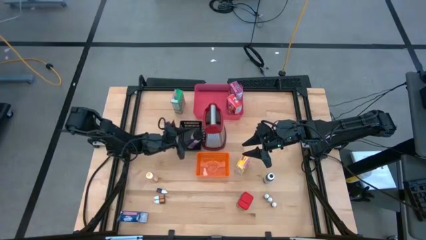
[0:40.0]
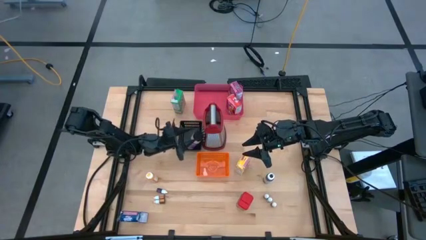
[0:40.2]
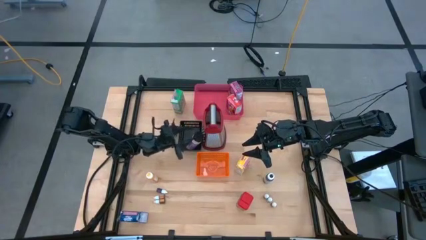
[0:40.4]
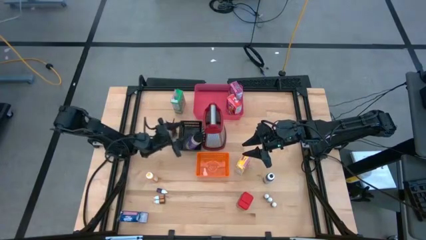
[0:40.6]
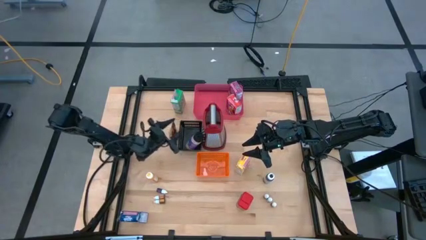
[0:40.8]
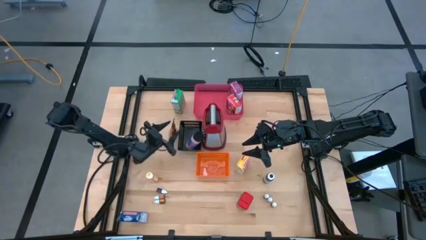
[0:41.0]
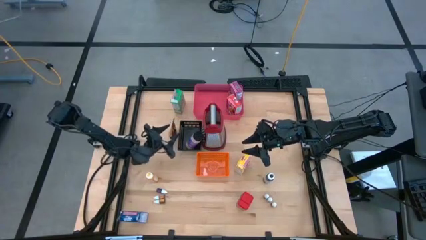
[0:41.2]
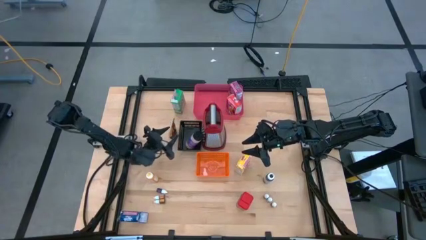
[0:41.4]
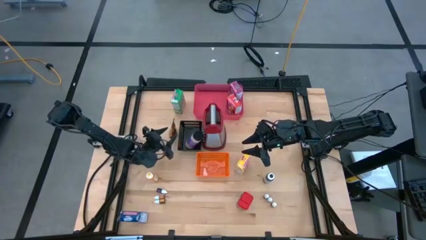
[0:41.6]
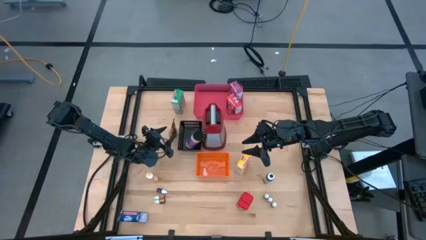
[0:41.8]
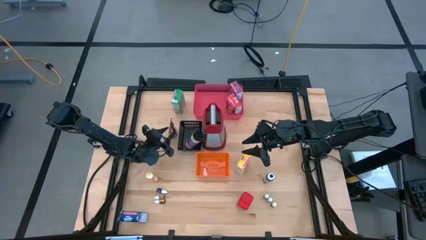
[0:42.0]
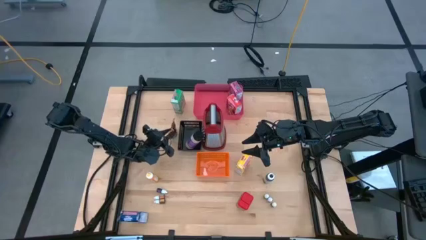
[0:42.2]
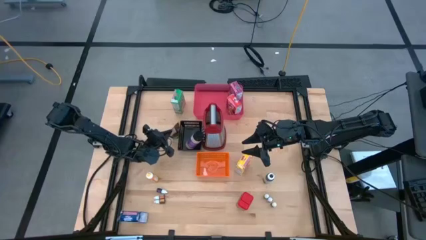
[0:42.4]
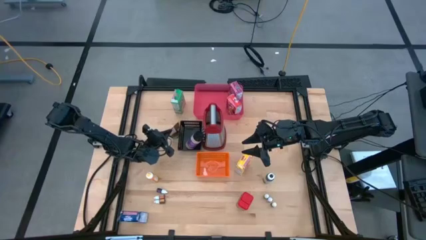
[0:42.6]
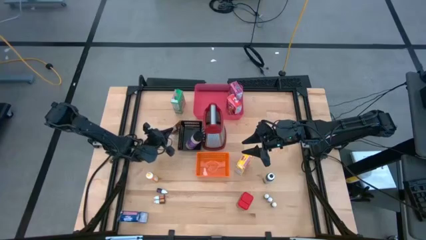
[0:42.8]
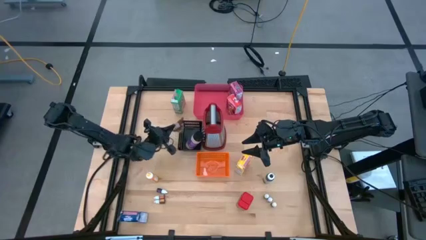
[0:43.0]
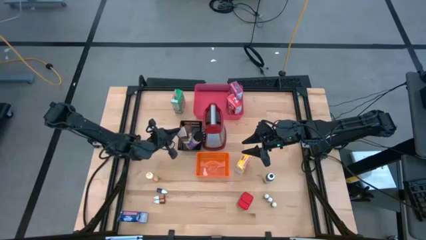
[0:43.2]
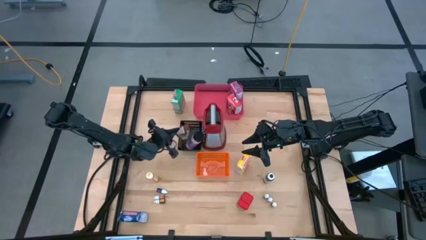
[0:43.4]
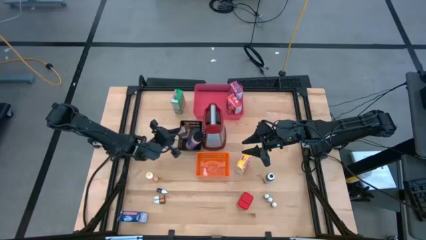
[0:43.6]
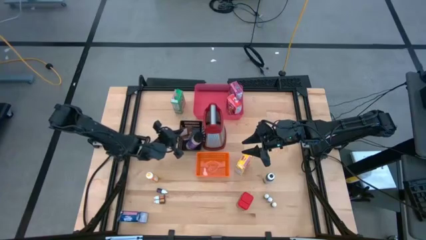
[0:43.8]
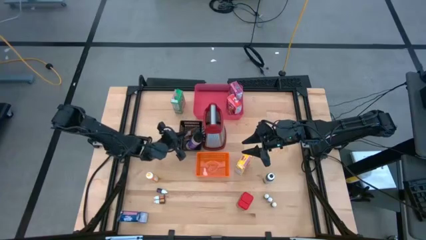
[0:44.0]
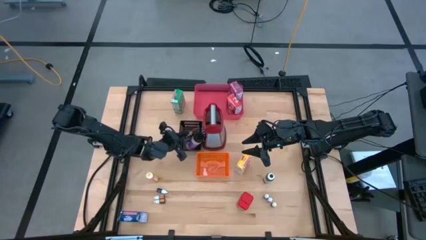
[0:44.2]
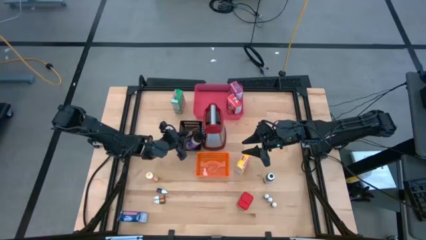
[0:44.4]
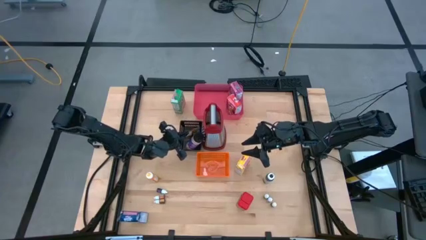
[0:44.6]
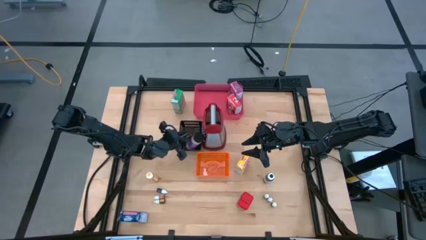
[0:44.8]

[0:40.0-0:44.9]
Task: Pick & Place Kitchen Items
Put the orange seasoning bag into the black bin

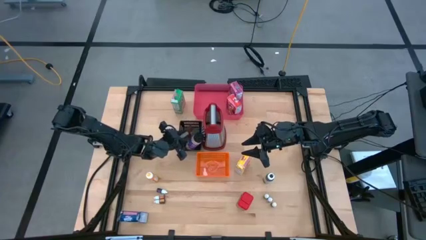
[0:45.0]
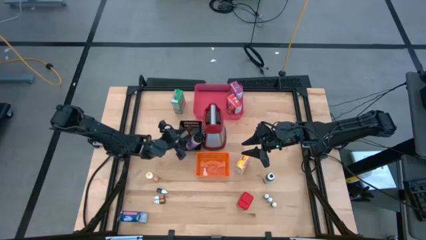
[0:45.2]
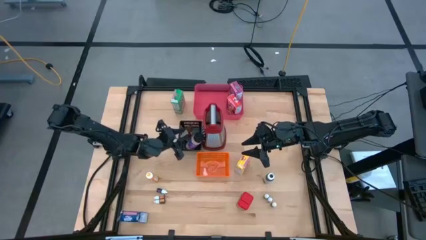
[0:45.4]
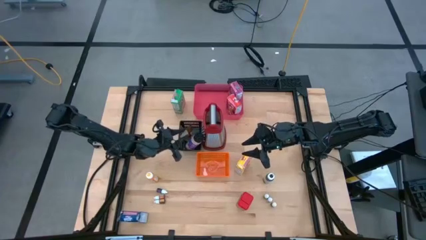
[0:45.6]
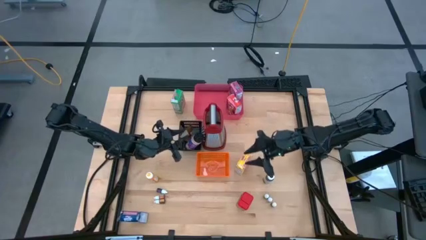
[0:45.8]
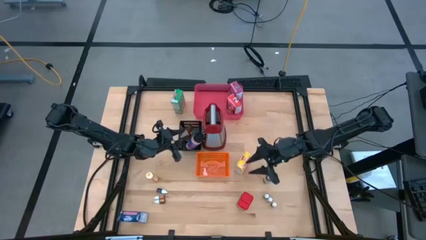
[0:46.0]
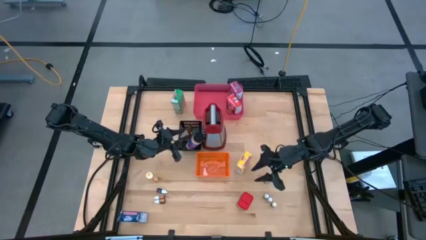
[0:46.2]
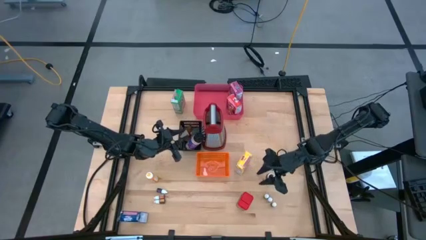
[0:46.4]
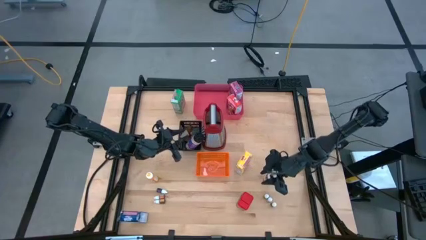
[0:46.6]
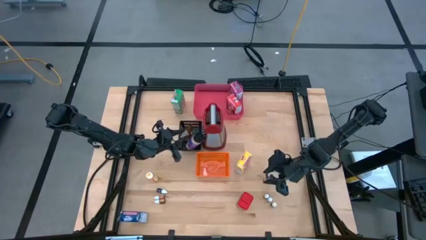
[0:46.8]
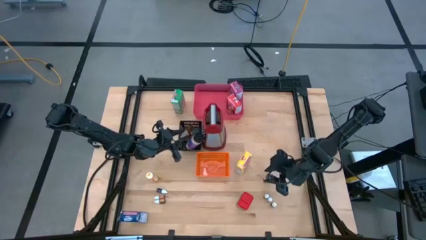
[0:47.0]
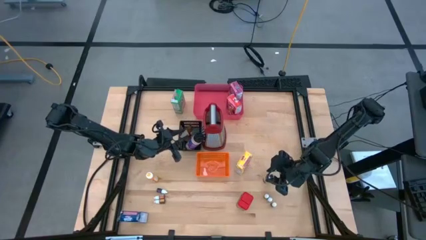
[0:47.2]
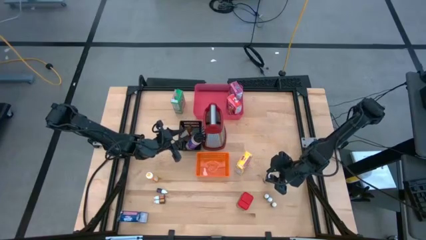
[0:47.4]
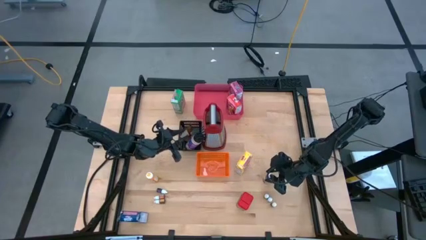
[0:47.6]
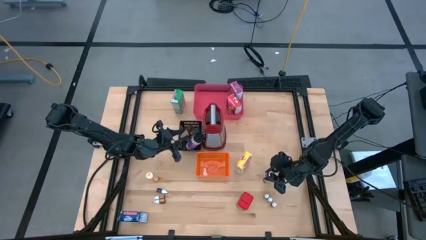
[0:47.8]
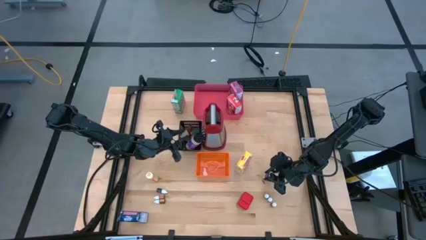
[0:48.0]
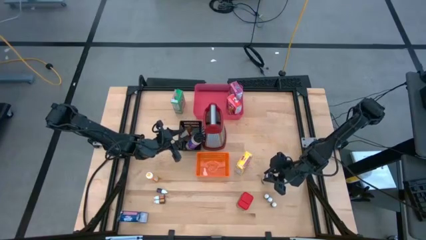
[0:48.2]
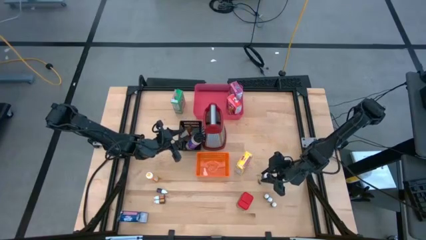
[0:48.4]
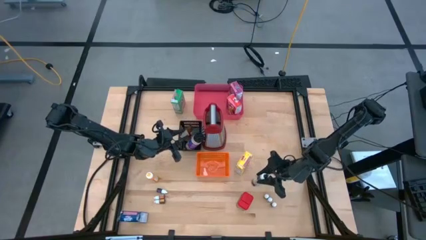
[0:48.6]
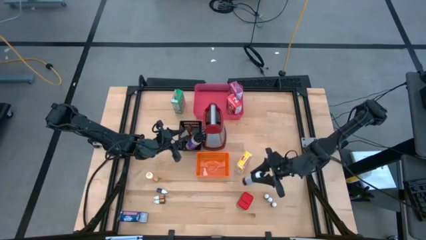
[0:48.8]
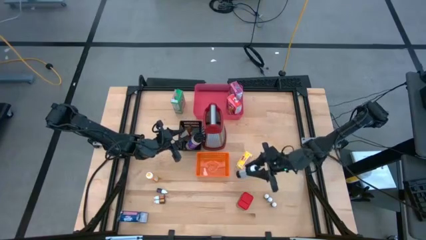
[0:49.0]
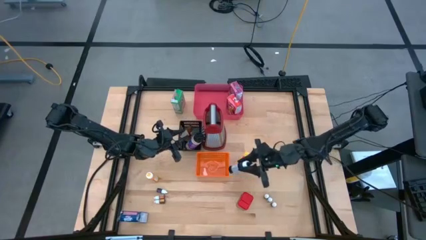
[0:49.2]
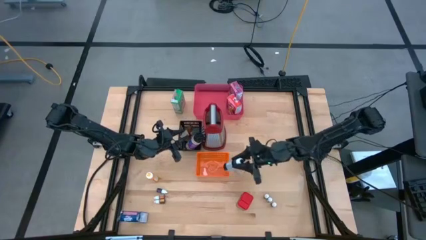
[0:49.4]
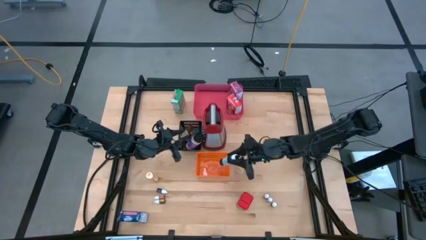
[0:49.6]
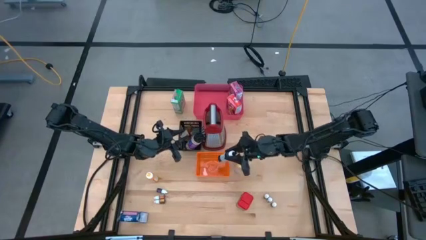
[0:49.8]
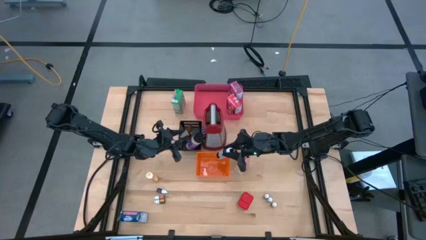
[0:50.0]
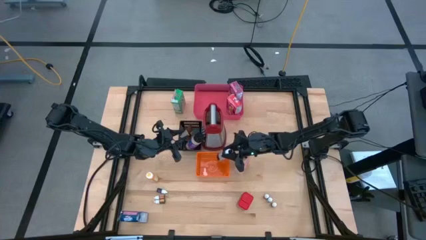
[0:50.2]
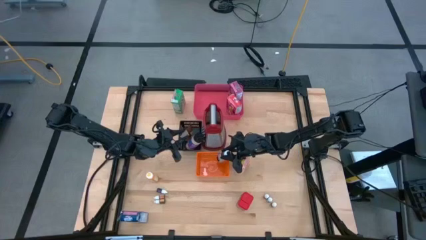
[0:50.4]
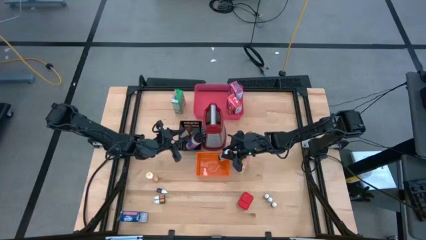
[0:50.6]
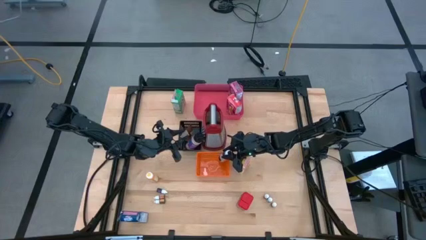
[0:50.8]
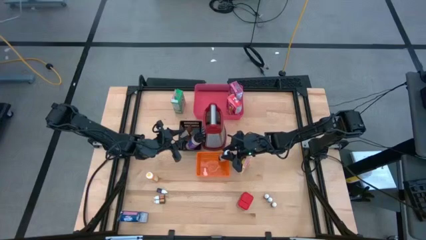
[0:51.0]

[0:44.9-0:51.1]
Put the large black food coloring bottle into the orange bin

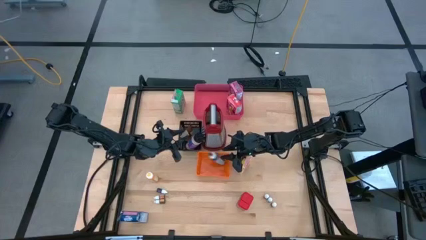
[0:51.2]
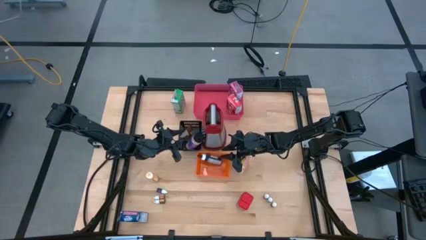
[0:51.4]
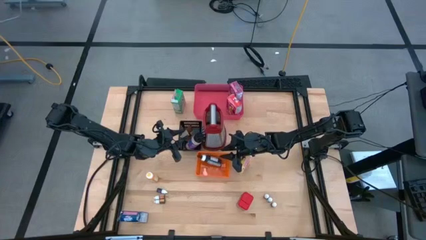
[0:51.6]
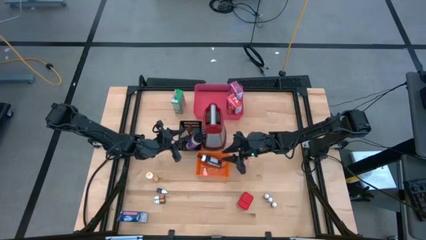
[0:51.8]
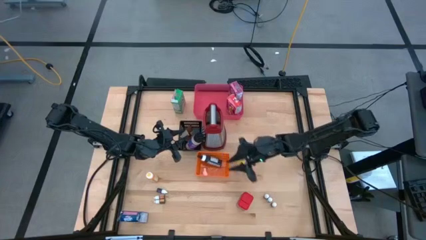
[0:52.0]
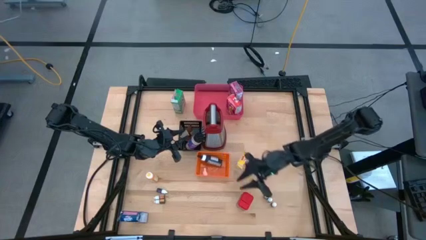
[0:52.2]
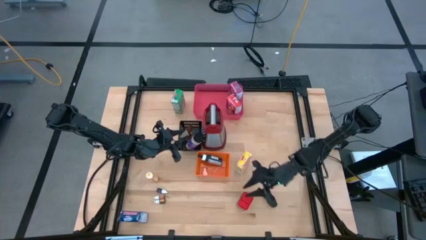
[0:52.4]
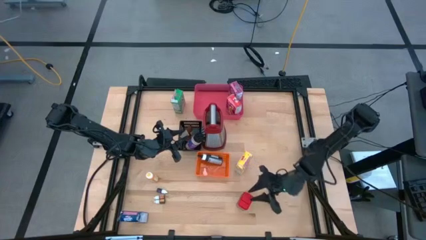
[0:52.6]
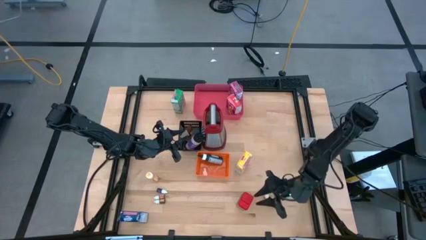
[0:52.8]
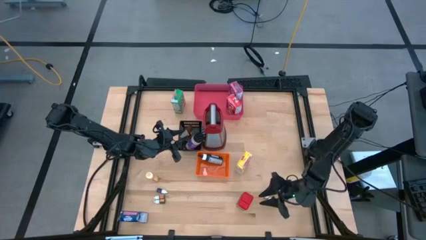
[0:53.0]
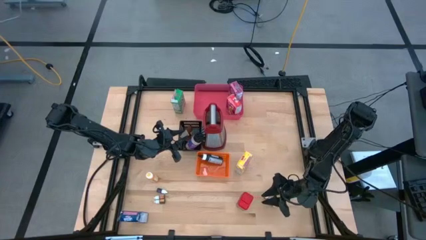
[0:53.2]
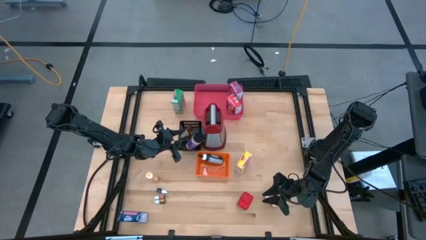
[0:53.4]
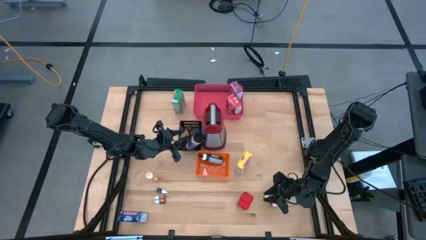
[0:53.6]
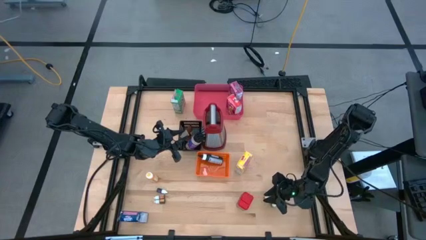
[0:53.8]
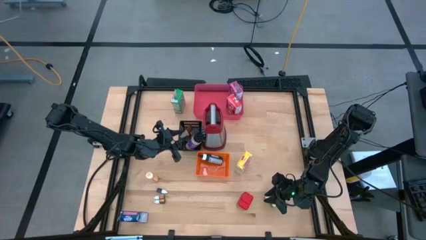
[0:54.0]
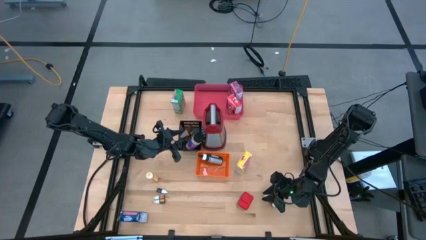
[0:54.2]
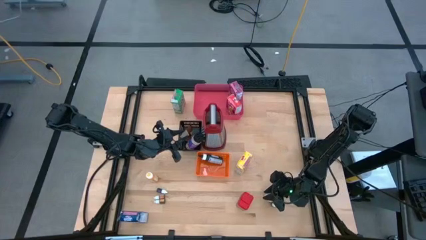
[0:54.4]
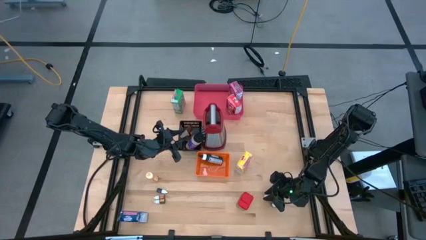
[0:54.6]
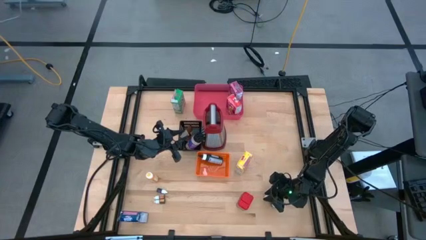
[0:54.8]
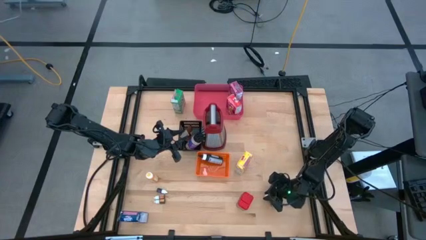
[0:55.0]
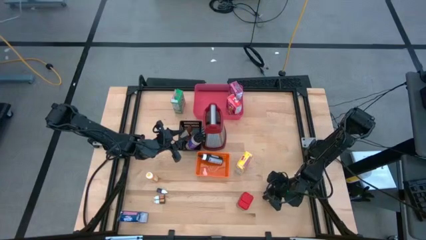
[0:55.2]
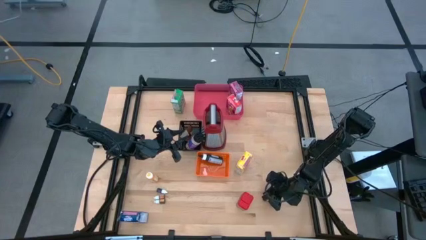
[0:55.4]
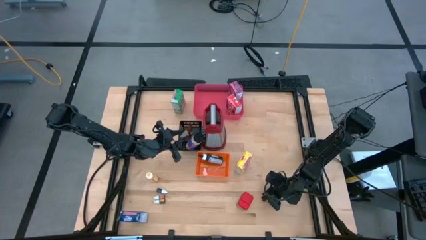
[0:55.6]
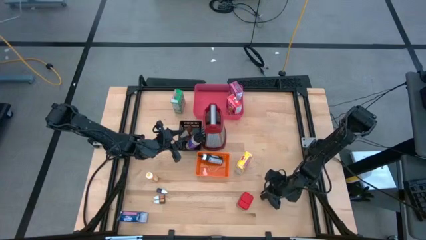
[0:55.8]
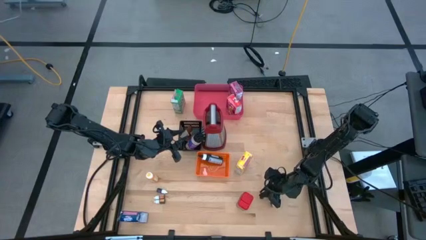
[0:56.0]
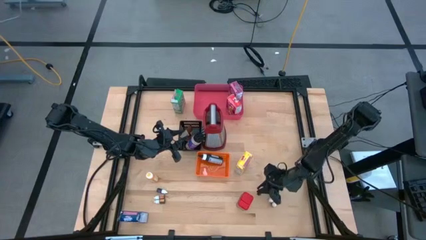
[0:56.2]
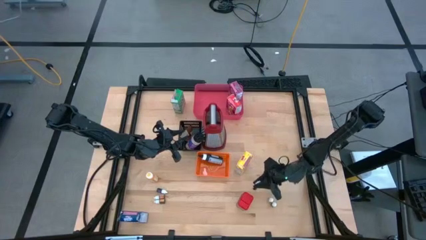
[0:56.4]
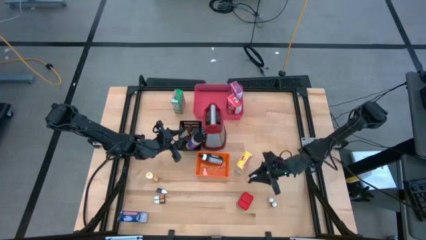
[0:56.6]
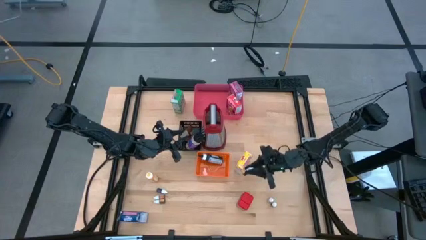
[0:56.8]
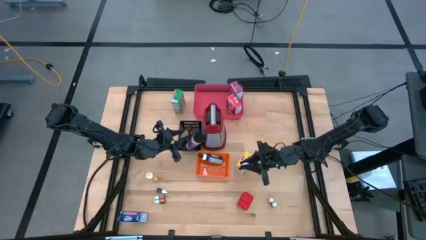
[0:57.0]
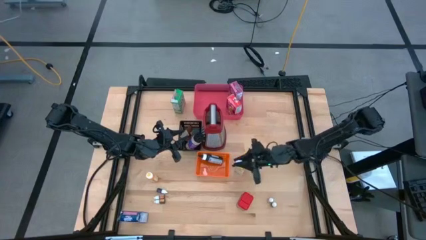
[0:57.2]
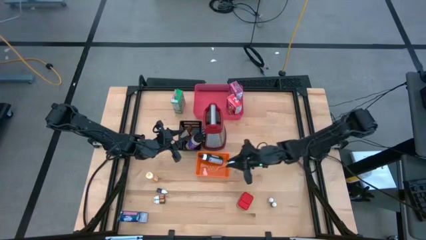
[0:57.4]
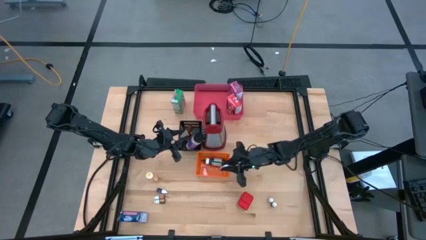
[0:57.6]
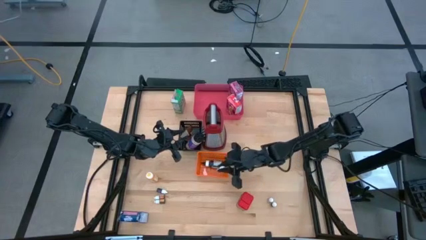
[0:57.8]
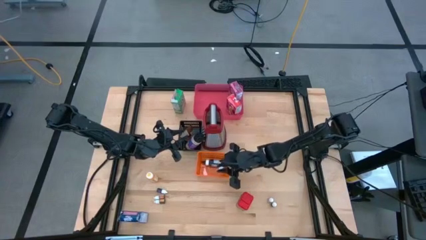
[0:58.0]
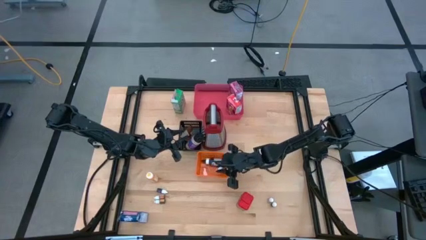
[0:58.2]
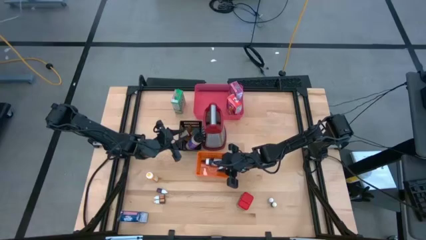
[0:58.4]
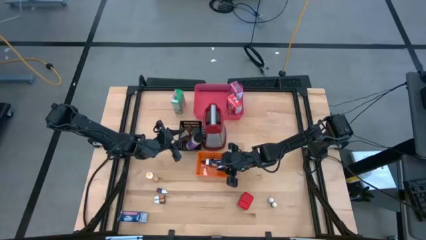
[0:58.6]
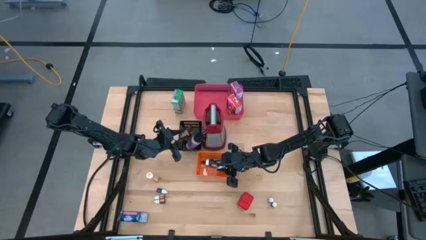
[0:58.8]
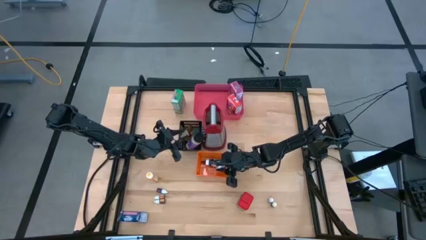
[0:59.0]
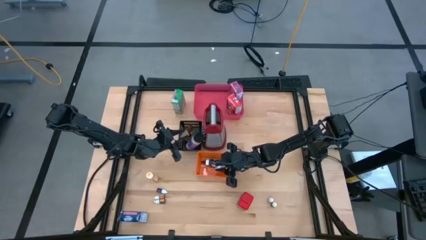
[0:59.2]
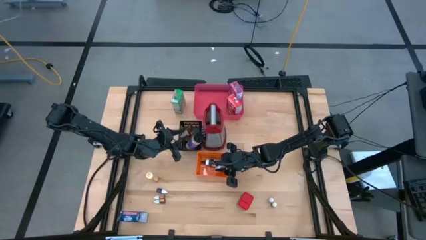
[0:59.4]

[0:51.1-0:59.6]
Put the red food coloring bottle into the orange bin
